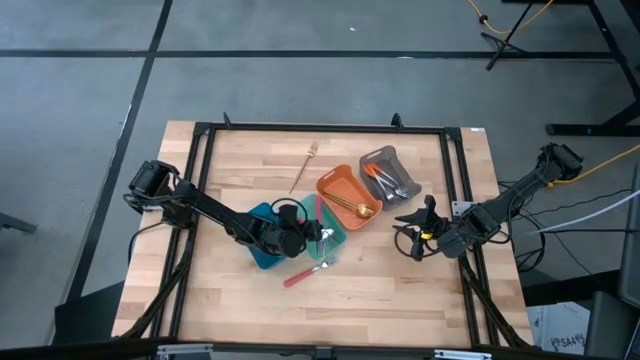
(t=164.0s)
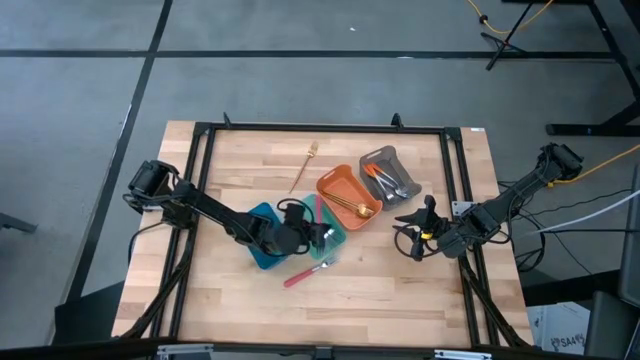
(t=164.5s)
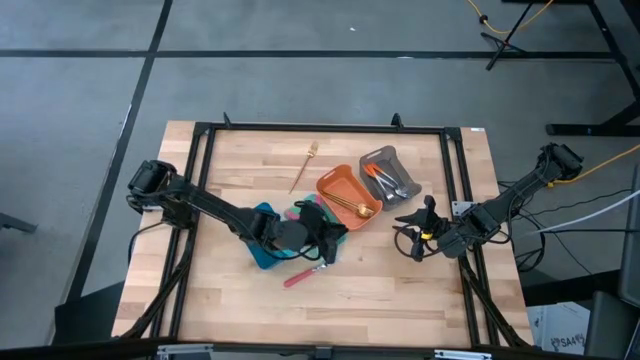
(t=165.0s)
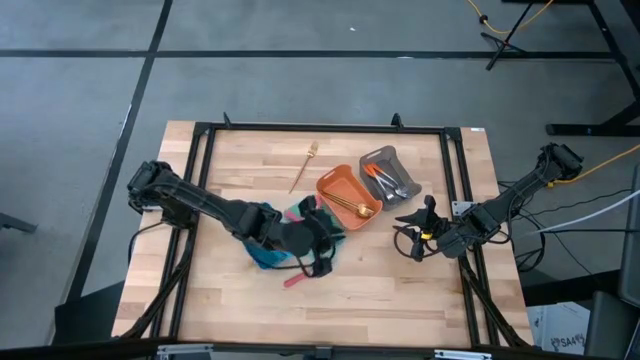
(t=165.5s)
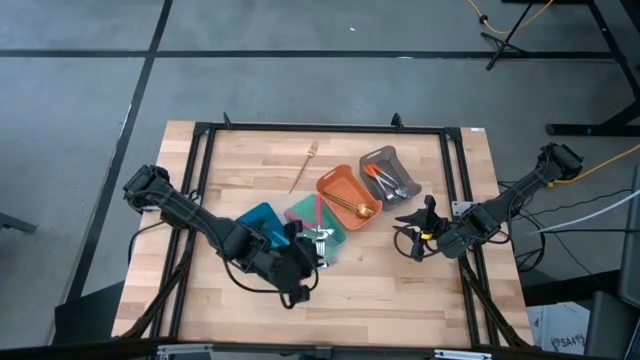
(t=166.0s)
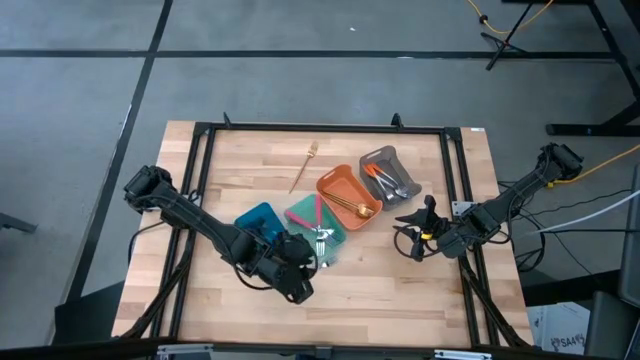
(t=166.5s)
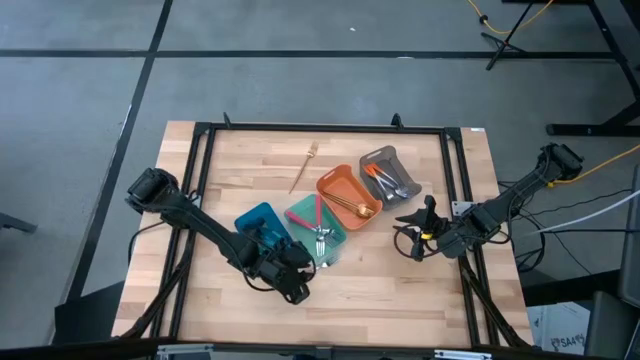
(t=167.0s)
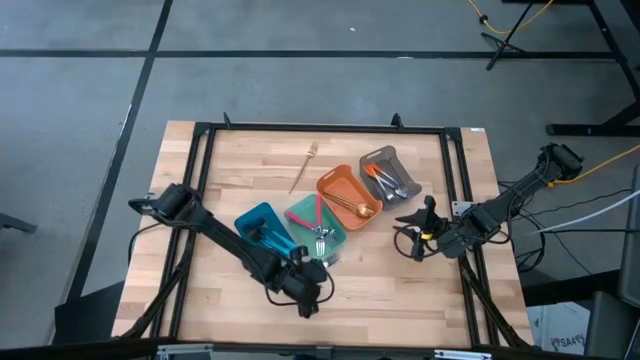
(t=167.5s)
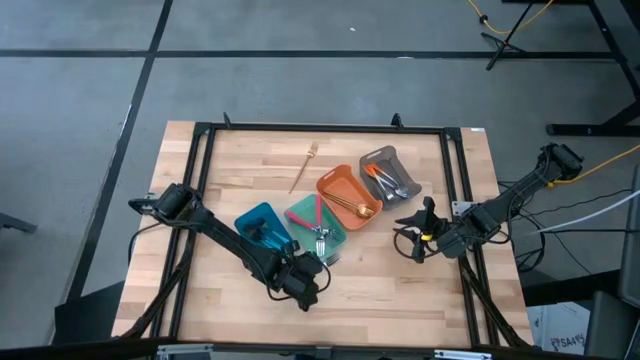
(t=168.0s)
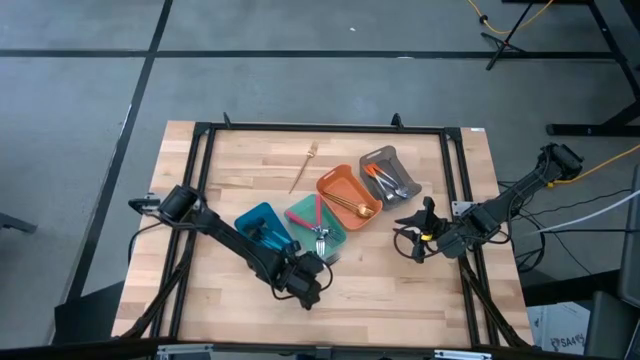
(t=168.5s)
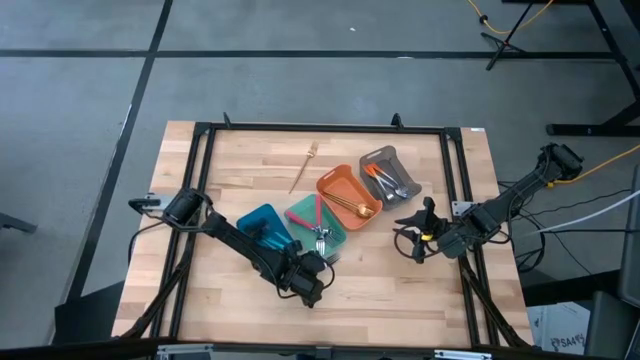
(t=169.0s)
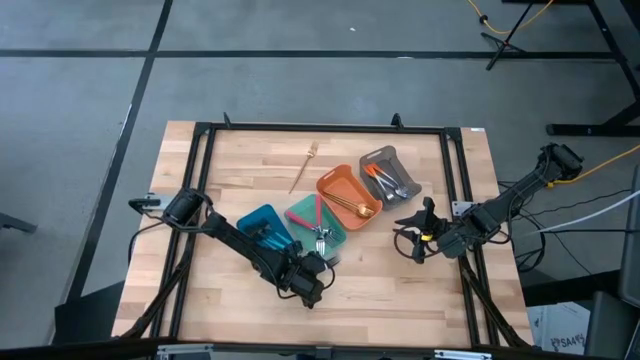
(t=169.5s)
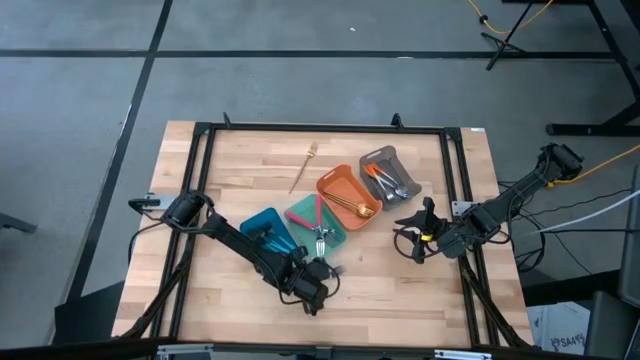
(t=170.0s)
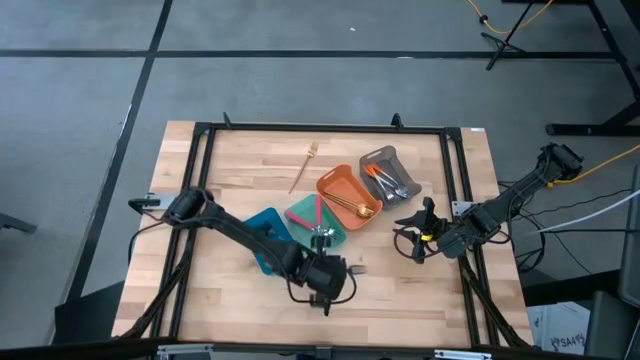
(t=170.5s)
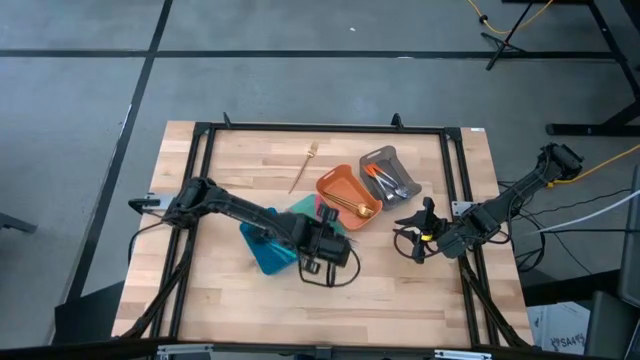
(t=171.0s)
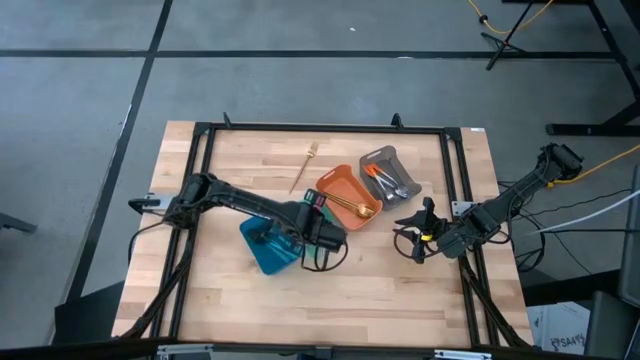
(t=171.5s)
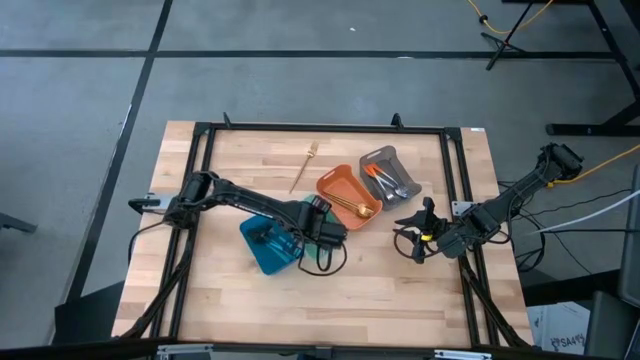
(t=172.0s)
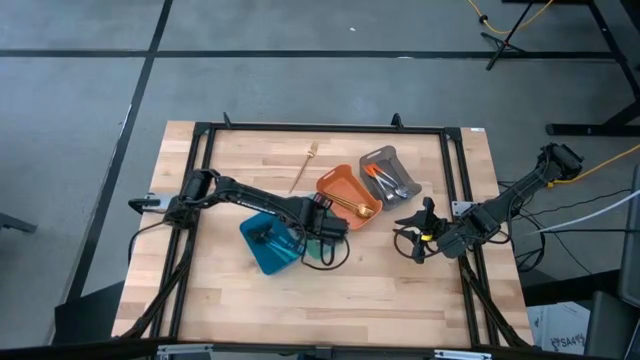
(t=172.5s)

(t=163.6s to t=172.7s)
Task: Sort silverware by color (type)
Put the pink fork into the green bin

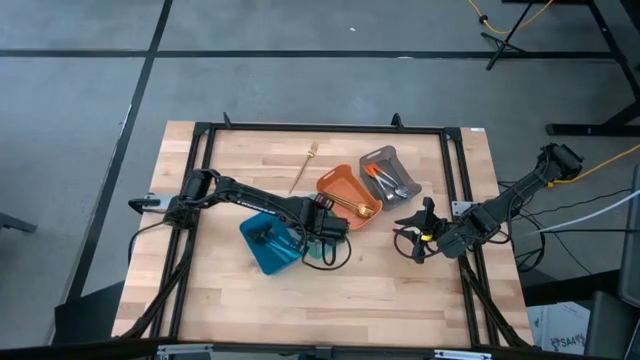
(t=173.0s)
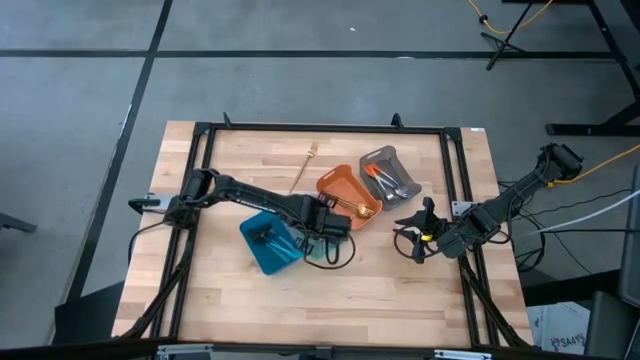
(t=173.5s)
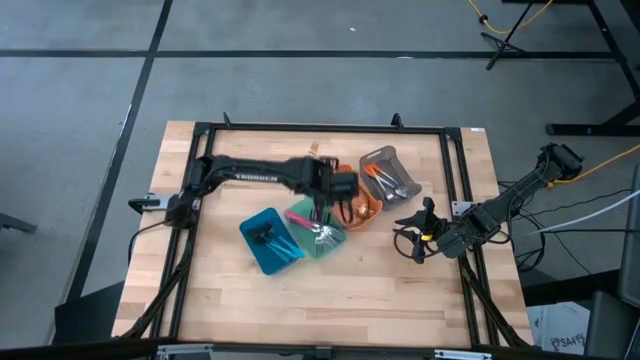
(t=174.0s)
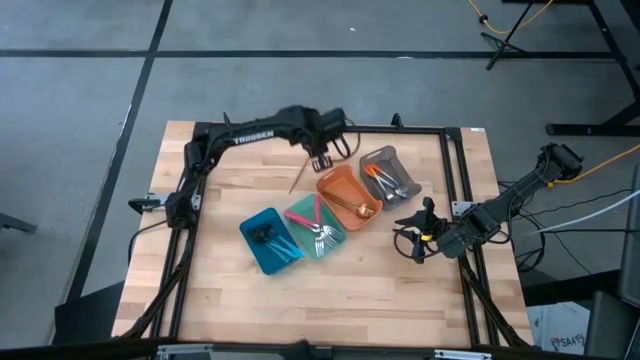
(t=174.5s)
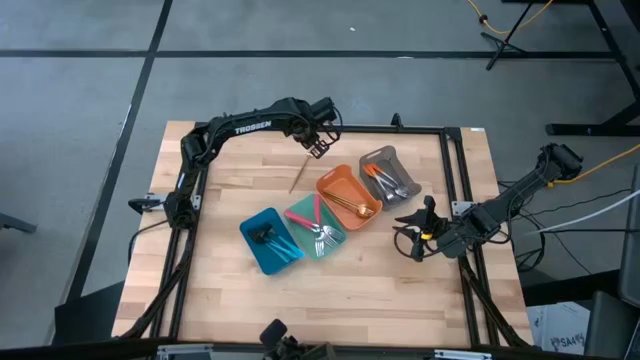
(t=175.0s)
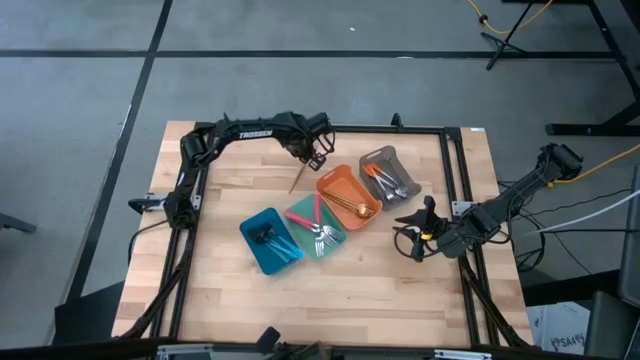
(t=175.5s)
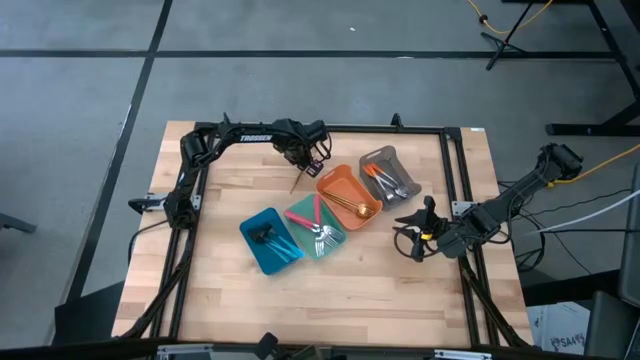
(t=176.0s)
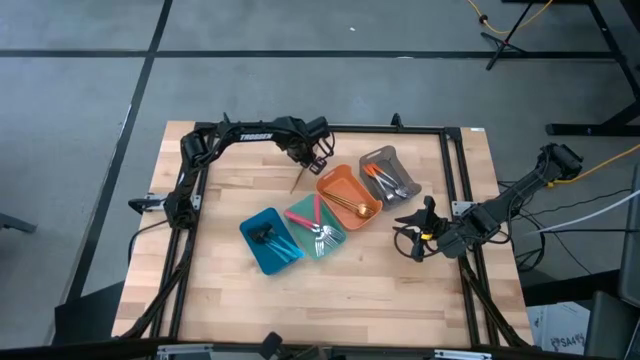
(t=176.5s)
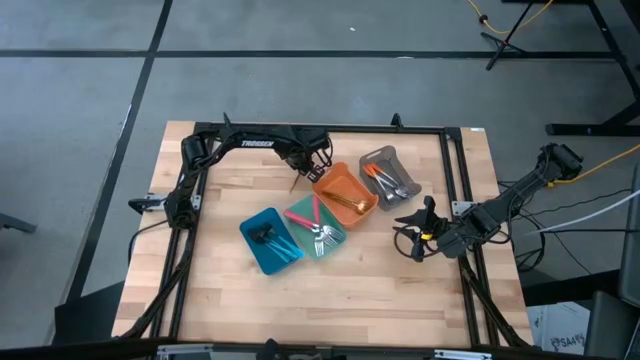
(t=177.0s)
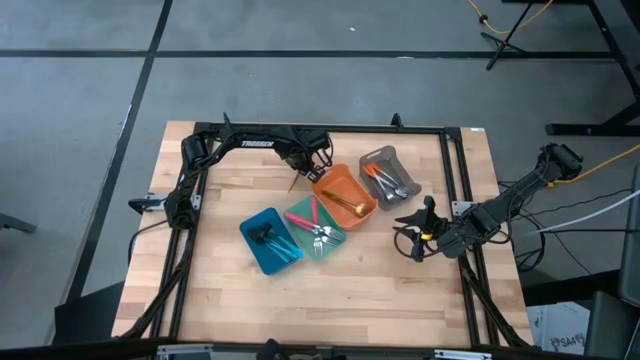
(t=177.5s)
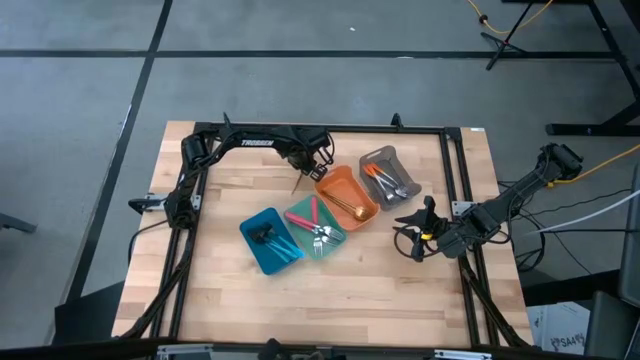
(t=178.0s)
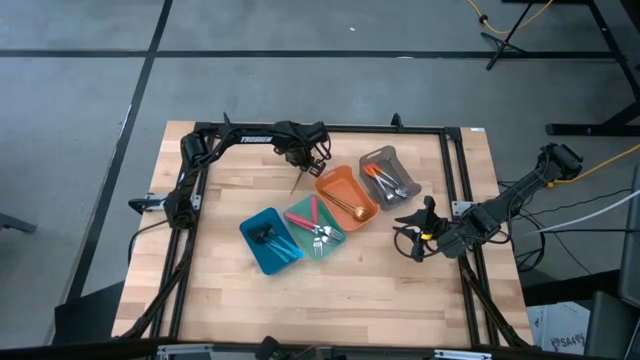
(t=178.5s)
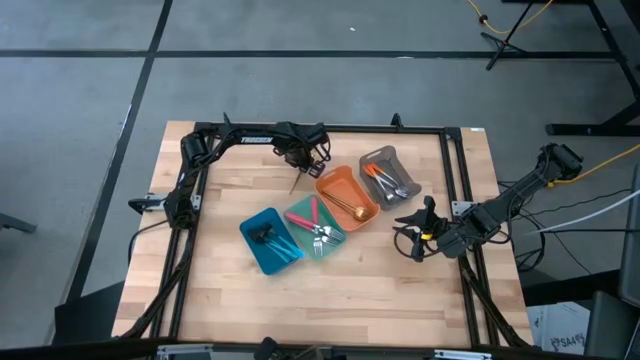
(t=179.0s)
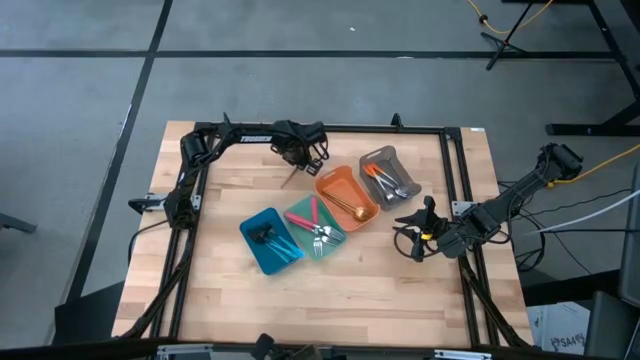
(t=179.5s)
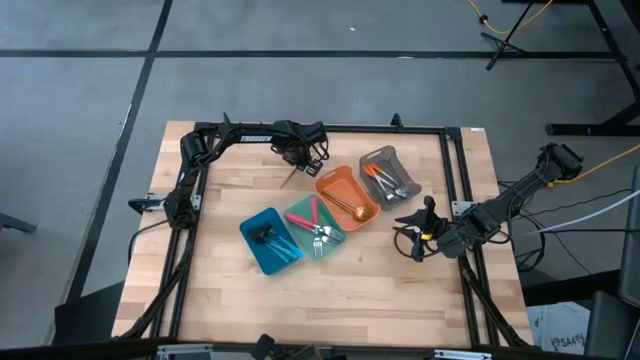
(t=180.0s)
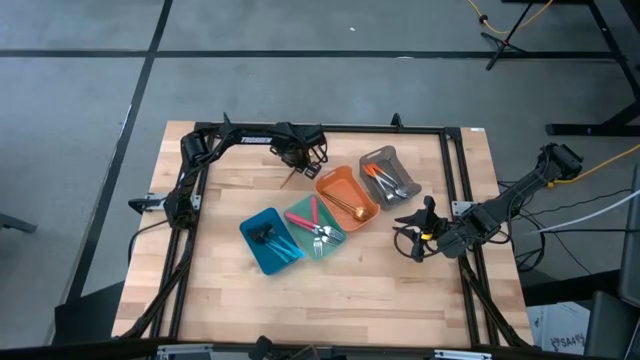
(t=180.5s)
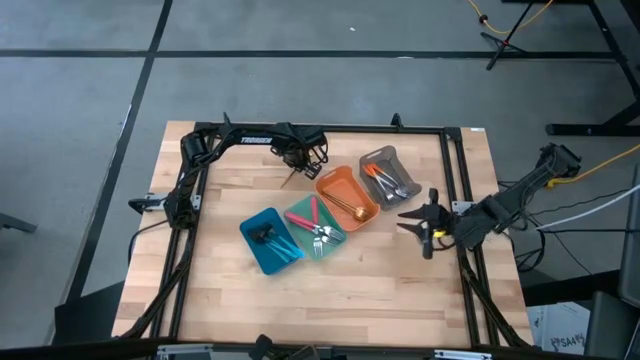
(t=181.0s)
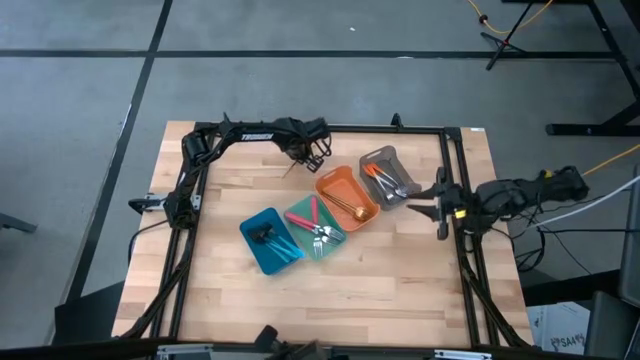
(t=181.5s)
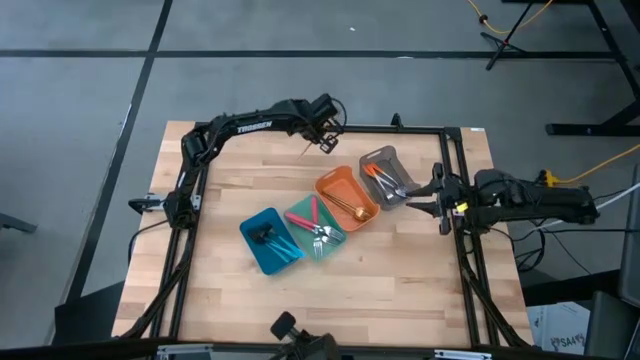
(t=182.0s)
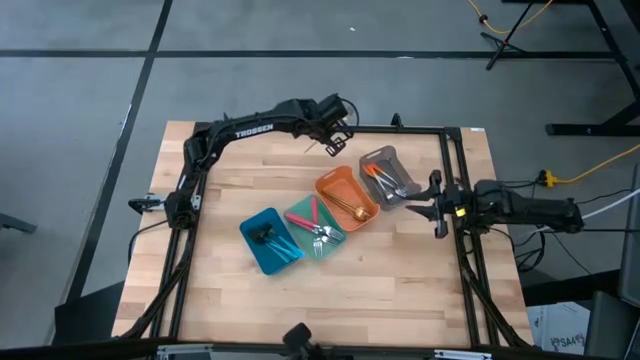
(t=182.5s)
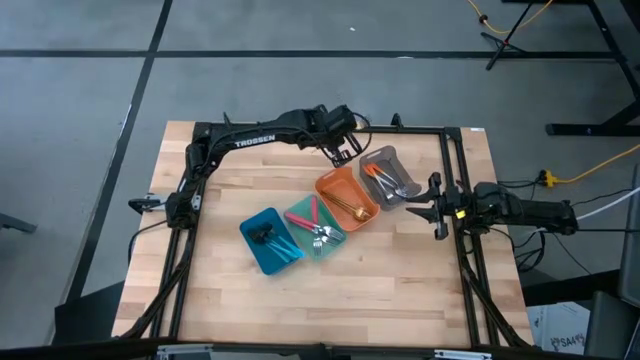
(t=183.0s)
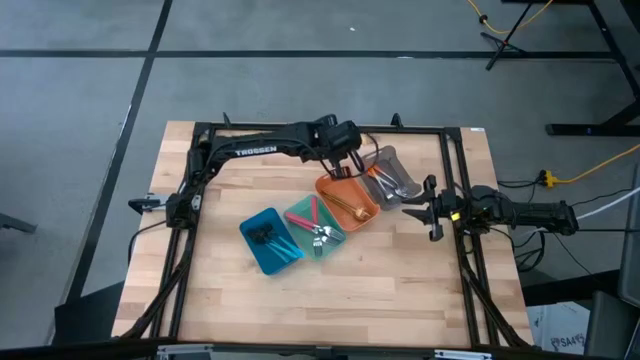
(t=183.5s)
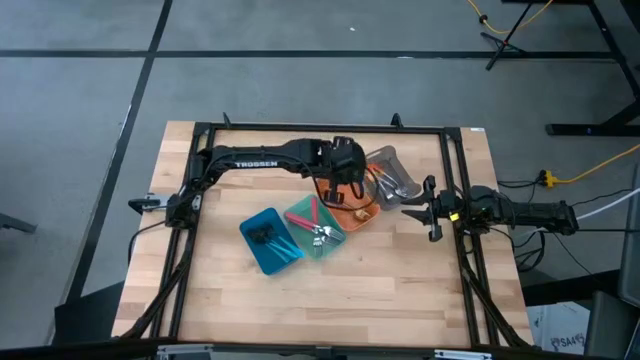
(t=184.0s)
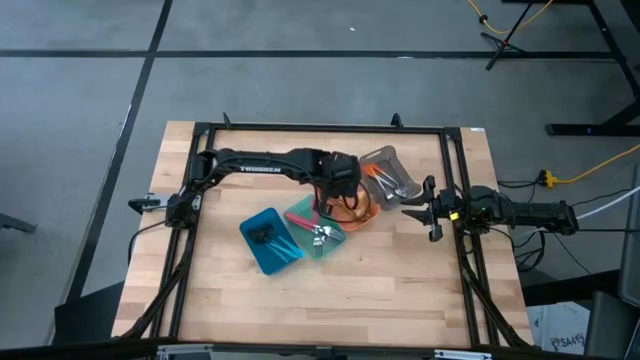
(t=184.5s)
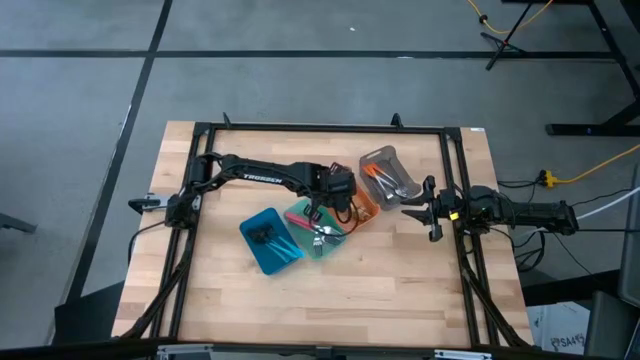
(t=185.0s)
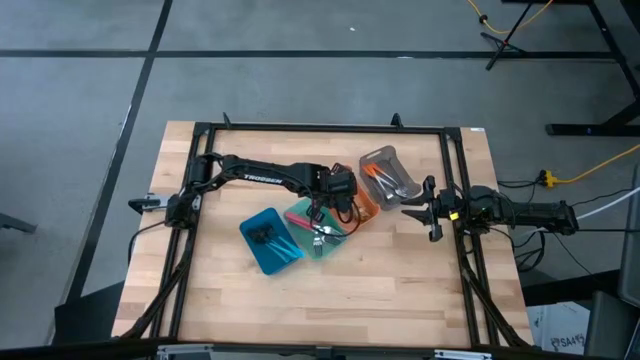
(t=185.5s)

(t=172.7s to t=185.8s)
Put the gold fork into the orange bin
